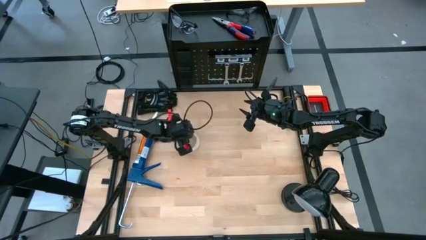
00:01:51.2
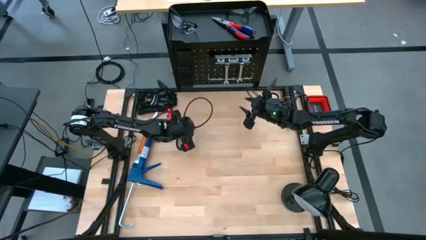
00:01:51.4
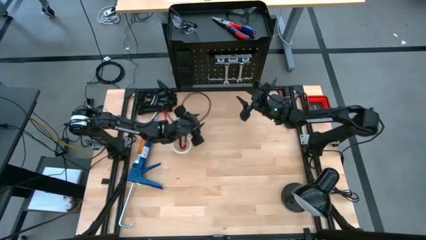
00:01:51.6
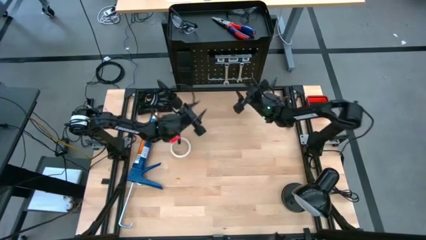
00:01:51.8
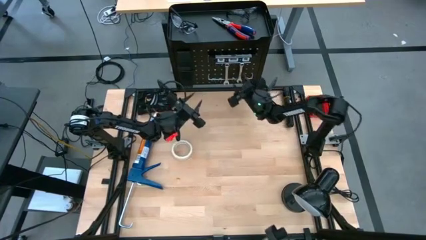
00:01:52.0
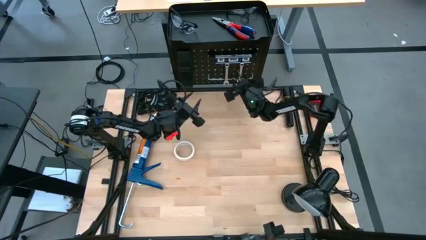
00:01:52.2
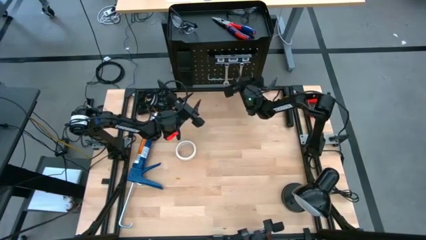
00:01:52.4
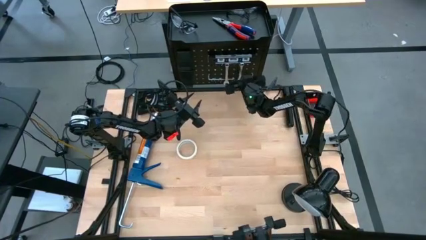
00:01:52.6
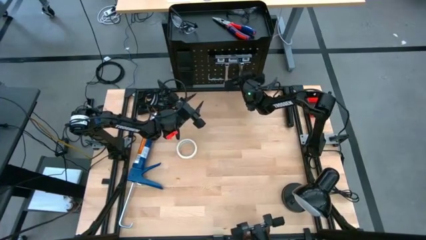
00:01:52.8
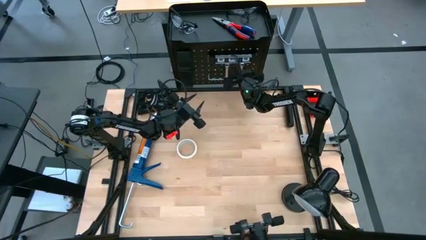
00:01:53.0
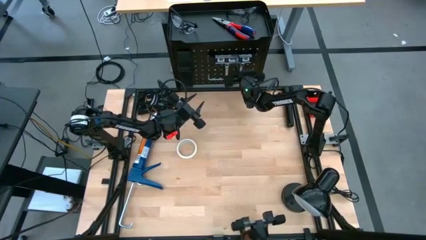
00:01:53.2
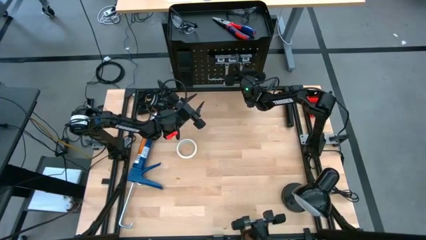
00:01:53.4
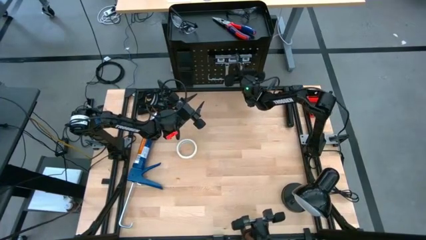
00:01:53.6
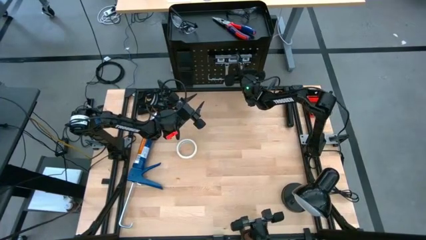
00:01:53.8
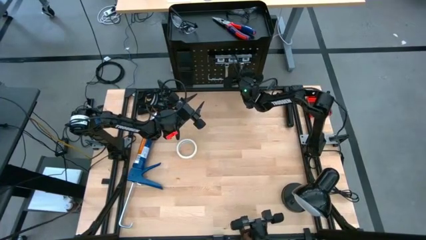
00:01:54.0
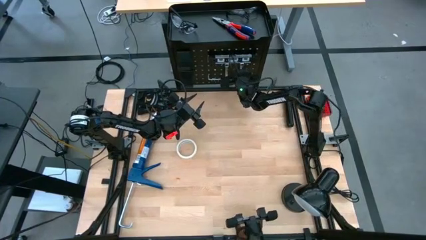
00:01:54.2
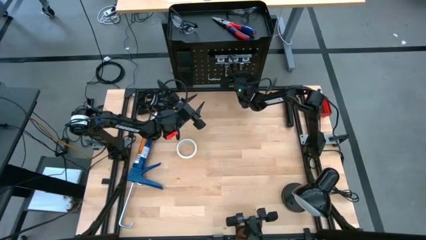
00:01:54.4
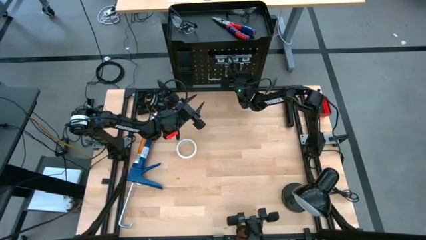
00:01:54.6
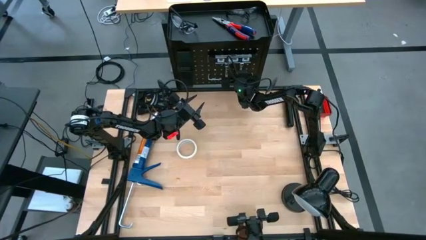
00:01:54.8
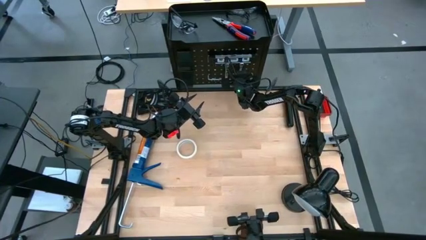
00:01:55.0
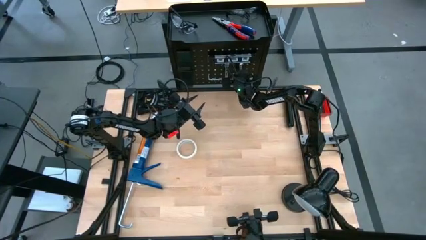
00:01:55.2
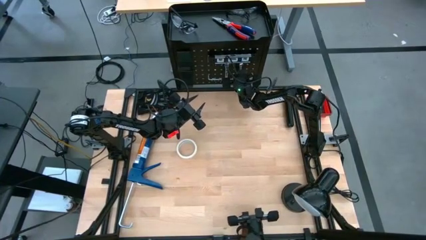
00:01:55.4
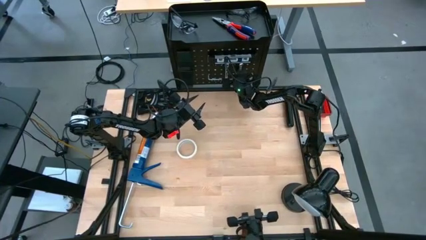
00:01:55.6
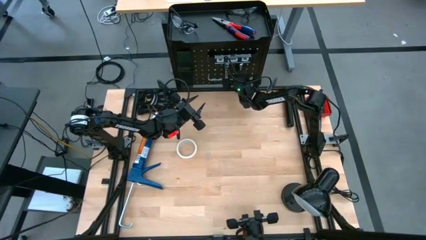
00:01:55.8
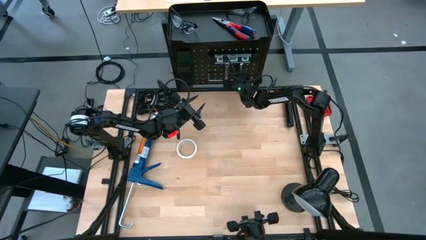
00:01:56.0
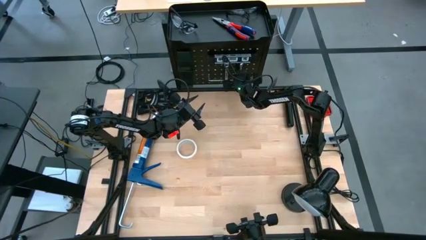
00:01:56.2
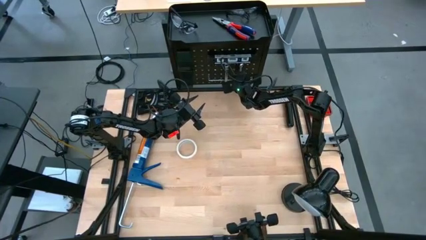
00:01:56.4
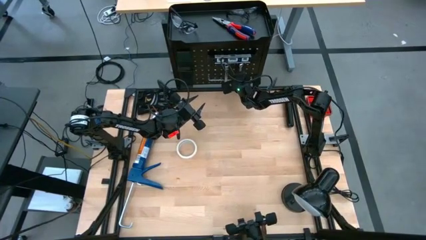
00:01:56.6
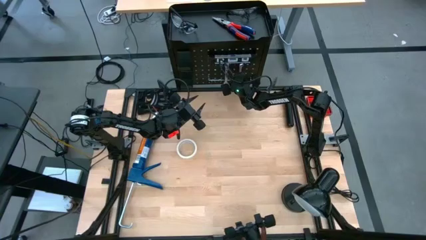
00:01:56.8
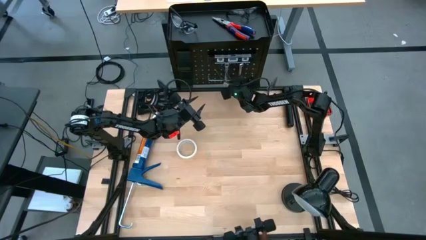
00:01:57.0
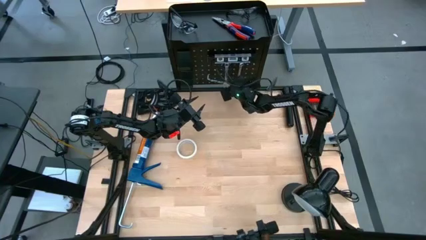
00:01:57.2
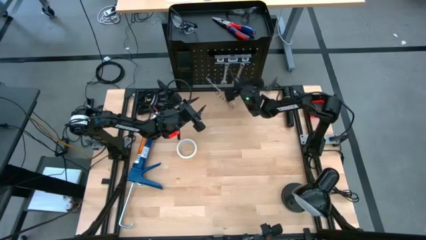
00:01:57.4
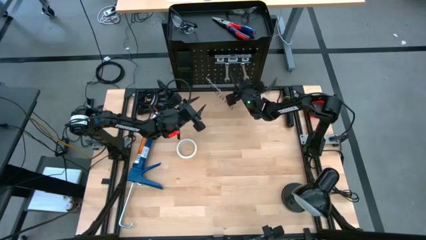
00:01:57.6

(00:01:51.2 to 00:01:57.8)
Task: Hang tools onto peg board
Unhang the right wrench from the peg board

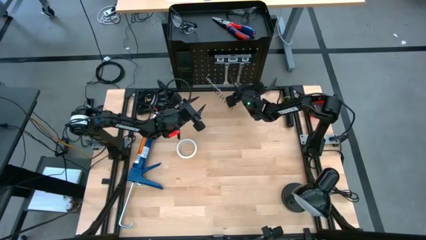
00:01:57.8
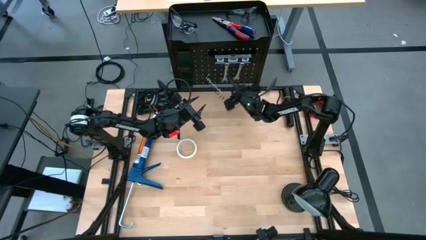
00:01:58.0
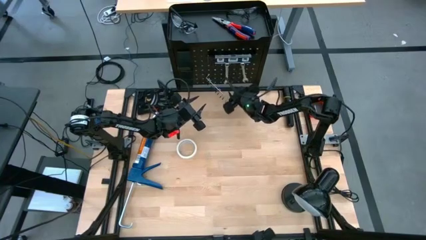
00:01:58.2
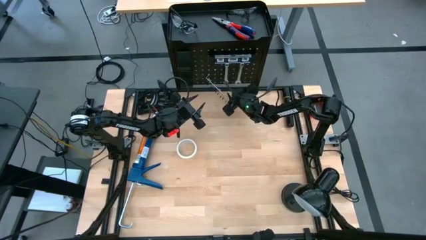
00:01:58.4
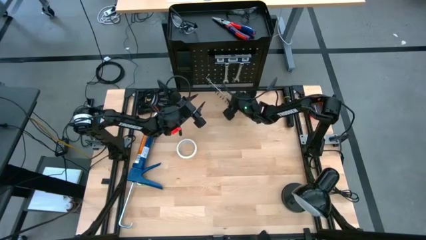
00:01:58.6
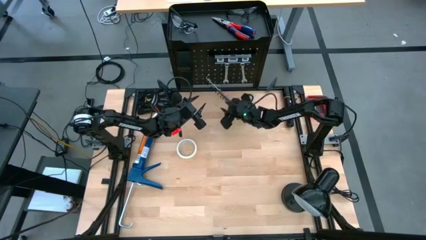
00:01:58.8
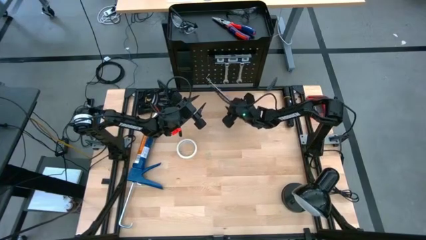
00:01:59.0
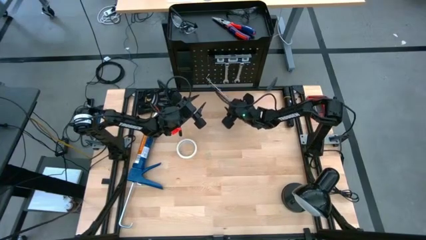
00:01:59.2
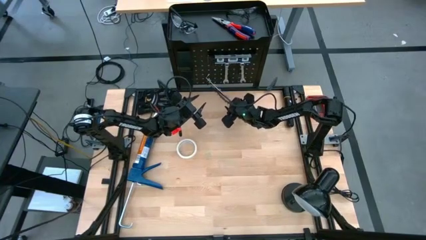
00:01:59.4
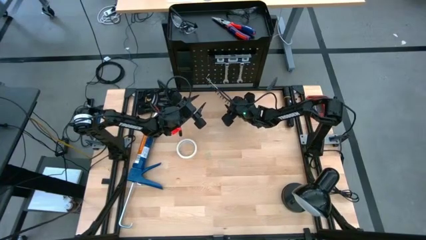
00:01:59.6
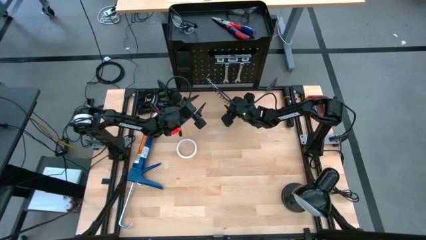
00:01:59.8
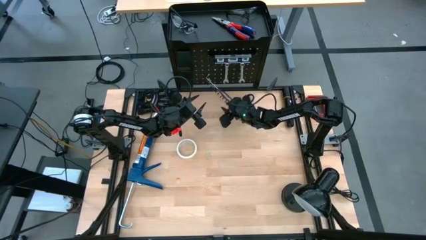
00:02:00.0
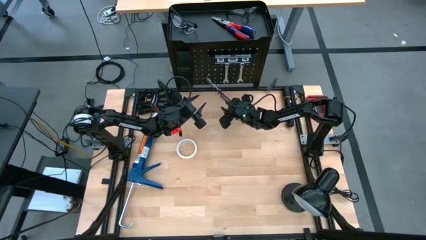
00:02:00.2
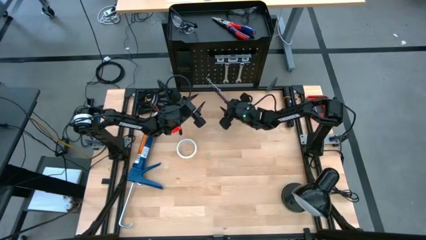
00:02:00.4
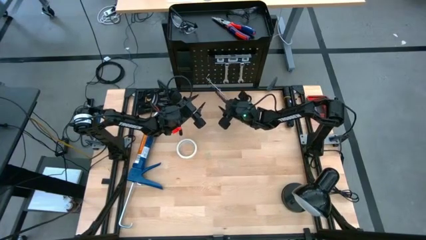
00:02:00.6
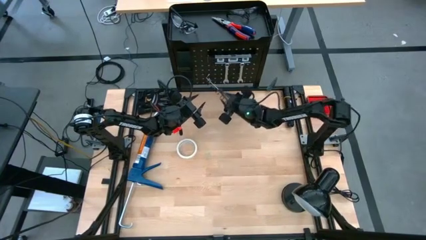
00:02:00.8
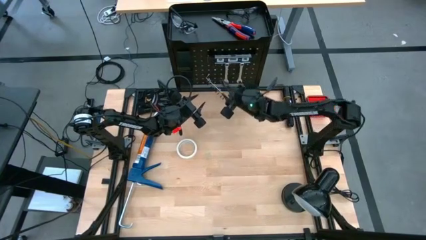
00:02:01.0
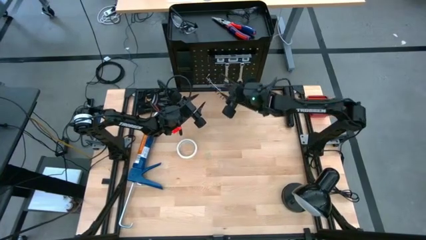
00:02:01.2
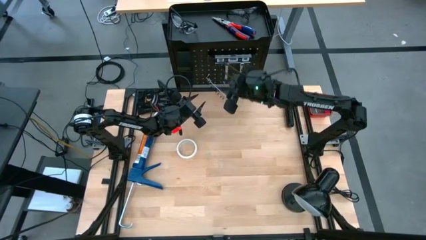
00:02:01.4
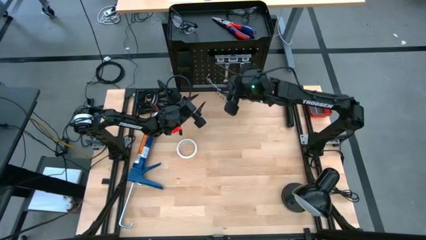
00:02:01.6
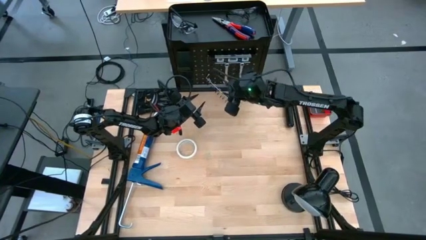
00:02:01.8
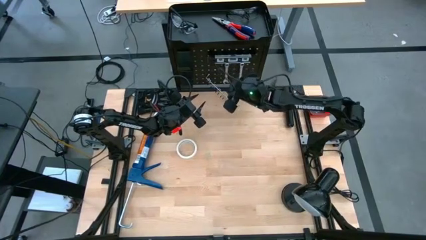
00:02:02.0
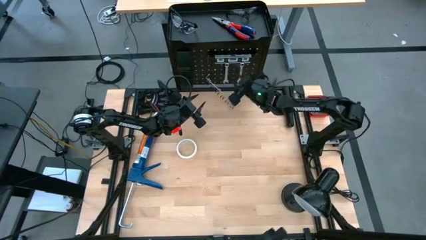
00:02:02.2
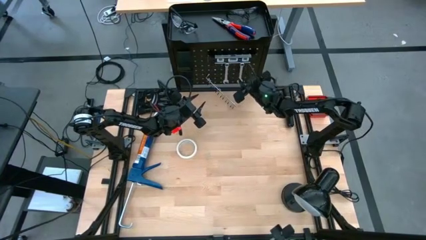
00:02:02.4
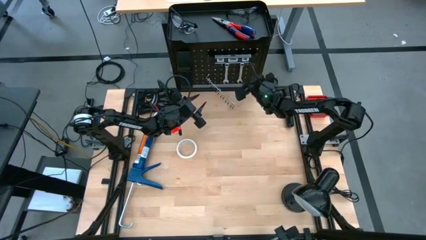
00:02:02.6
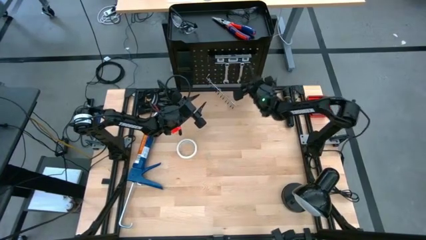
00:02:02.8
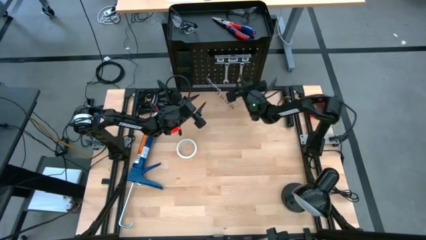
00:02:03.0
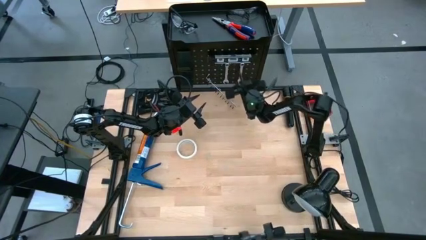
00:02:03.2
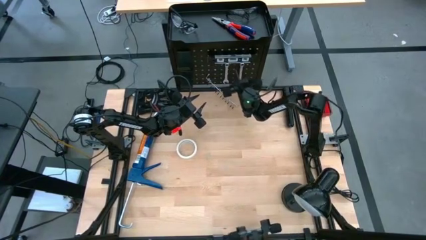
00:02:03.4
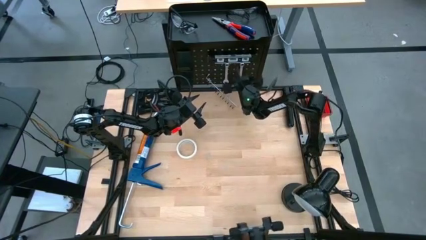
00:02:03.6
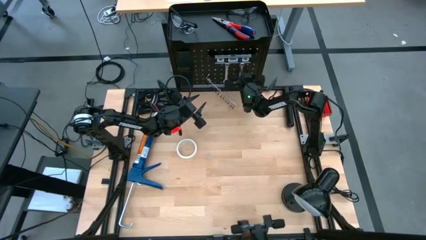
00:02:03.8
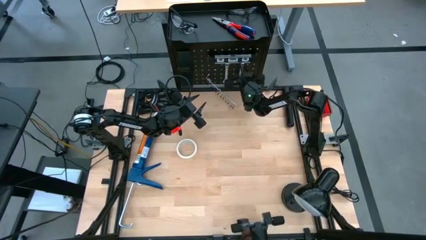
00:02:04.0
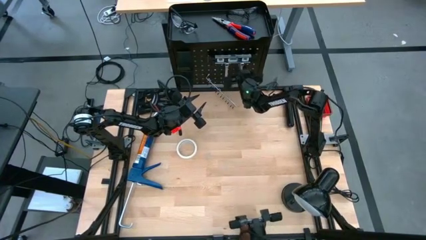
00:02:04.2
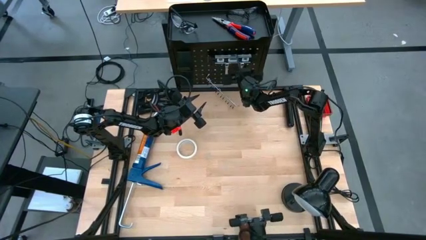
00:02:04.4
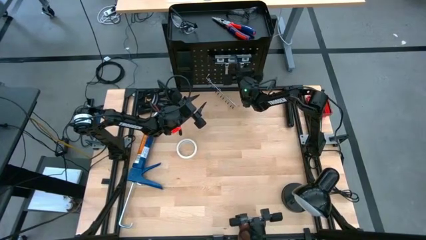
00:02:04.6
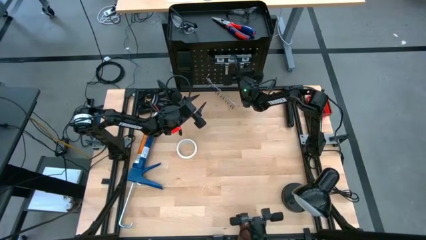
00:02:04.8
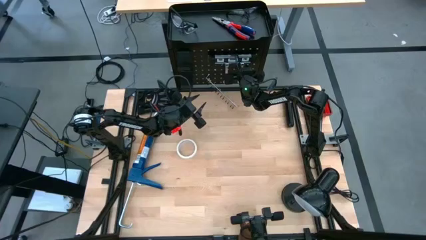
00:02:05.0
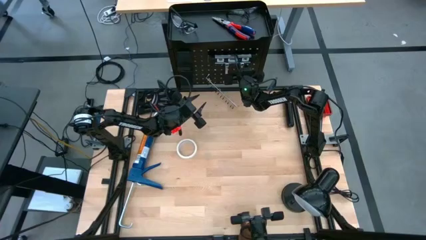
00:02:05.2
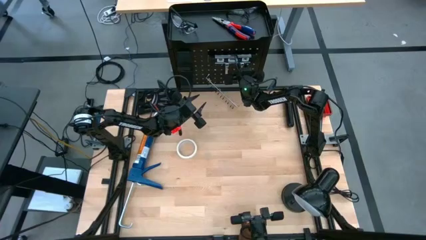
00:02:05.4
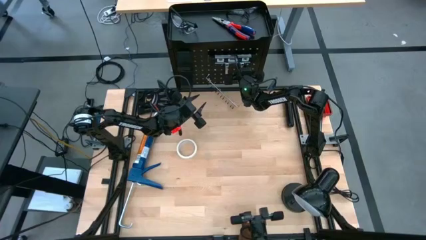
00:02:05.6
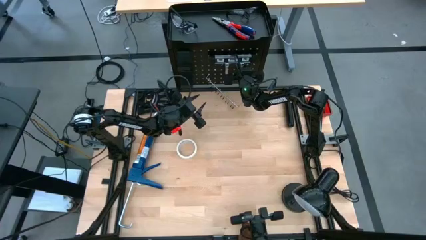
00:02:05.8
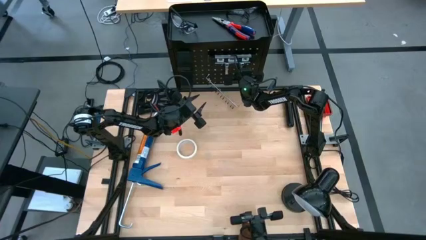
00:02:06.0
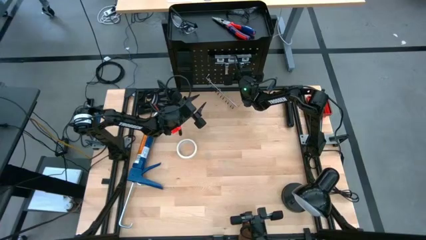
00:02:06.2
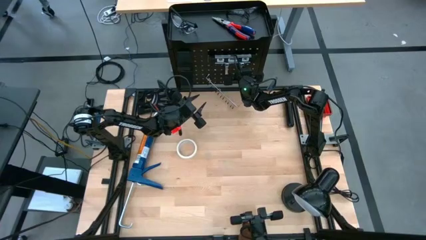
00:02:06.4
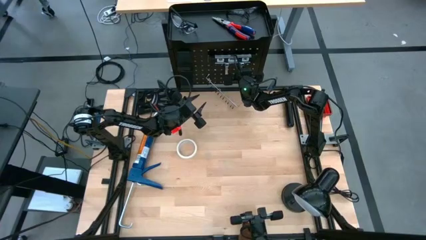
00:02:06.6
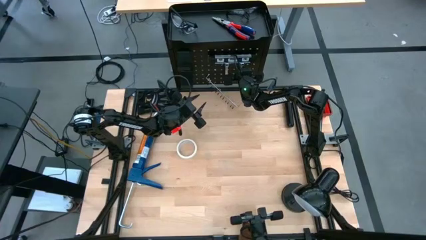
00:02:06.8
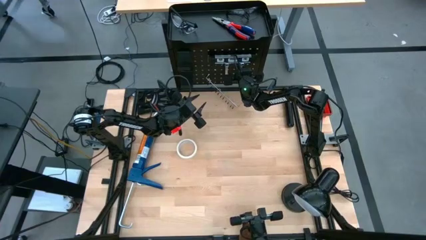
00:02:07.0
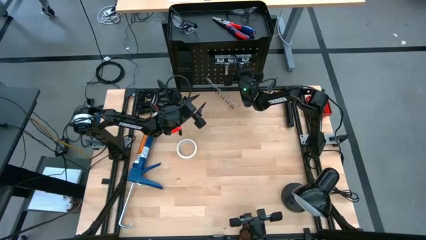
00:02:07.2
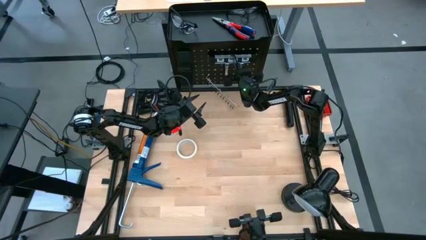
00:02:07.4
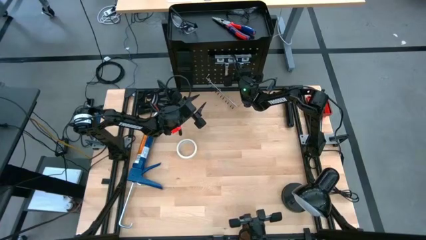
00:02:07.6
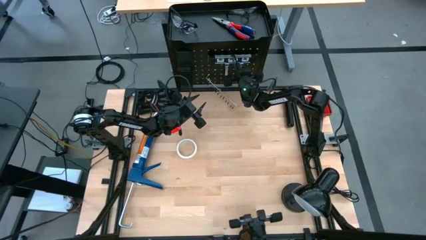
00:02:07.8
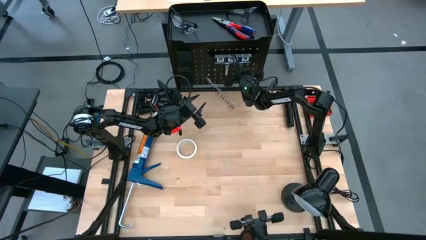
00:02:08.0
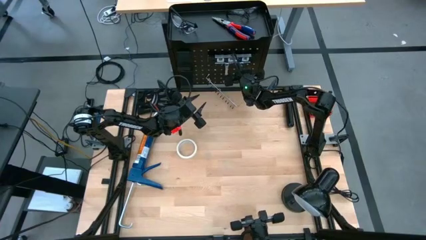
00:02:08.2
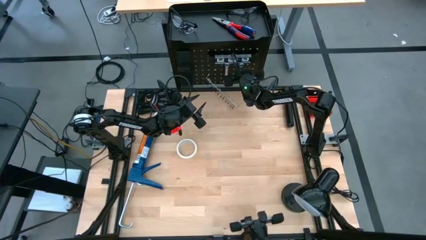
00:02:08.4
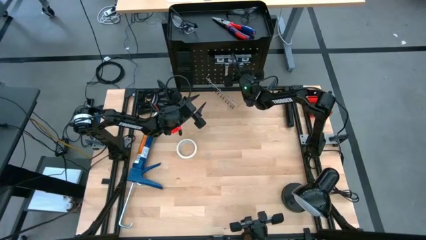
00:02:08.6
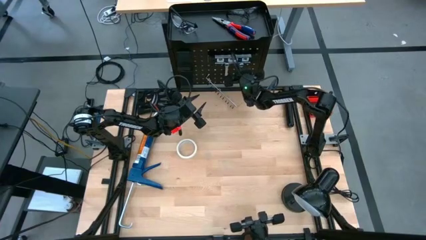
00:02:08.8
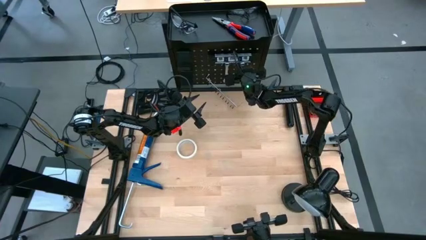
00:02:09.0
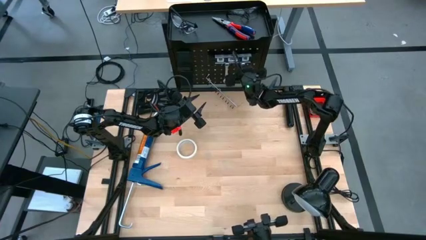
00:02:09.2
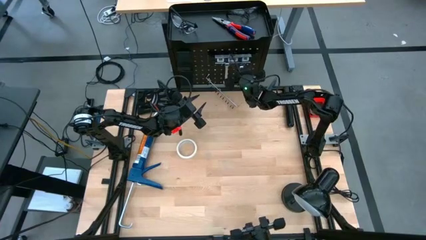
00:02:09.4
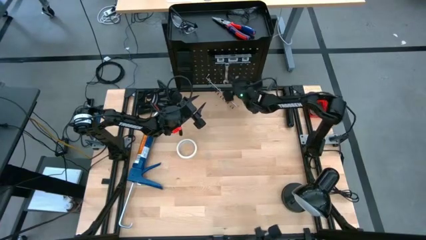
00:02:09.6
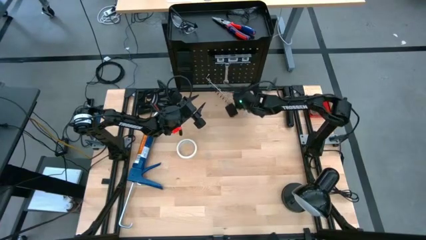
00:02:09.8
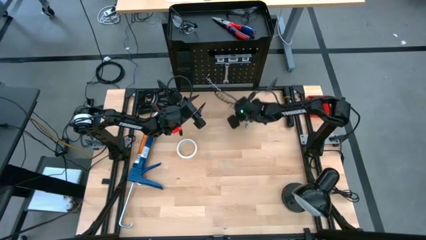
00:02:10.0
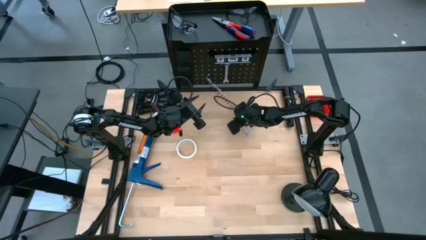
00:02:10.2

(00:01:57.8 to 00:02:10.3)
Unhang the right wrench from the peg board
